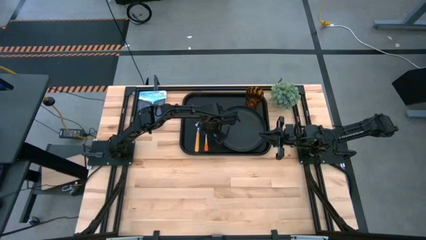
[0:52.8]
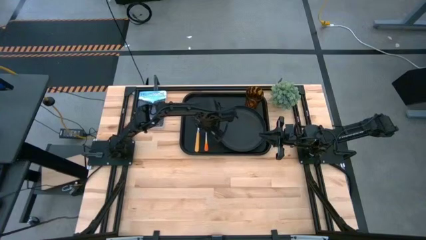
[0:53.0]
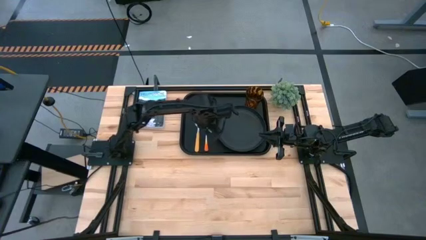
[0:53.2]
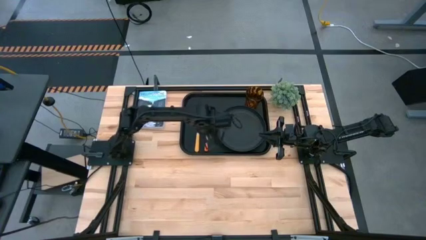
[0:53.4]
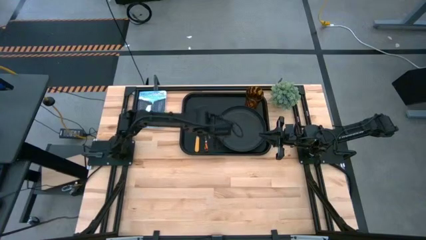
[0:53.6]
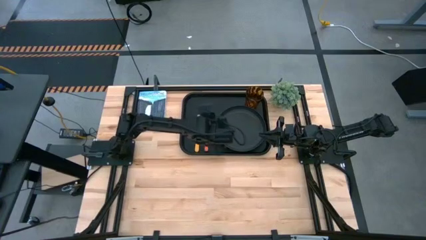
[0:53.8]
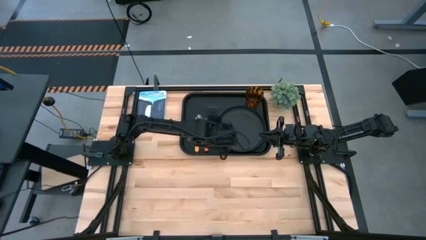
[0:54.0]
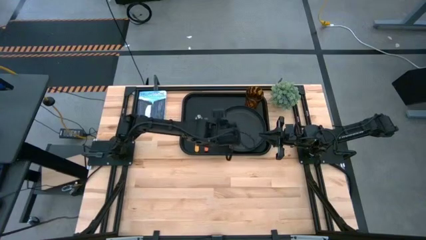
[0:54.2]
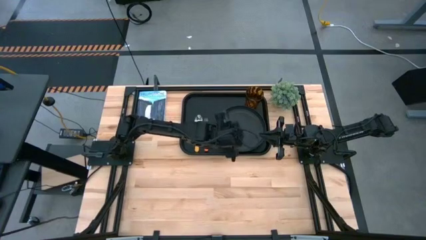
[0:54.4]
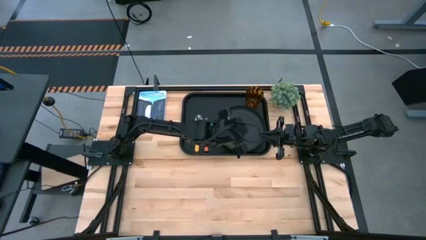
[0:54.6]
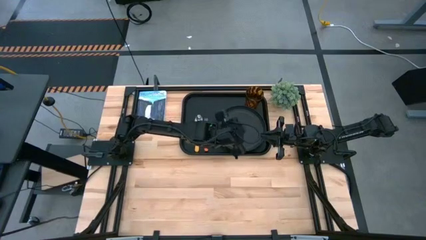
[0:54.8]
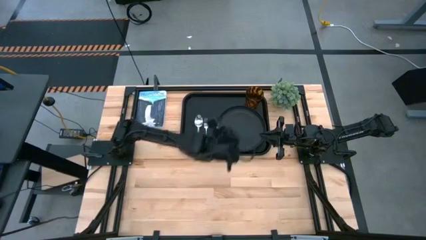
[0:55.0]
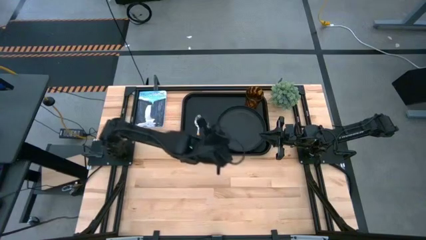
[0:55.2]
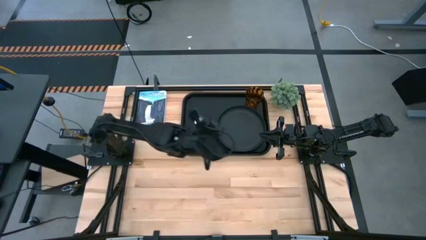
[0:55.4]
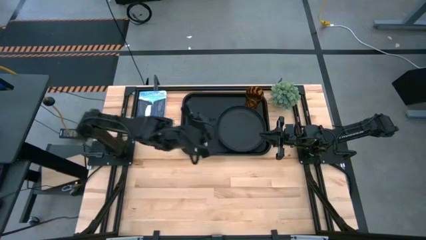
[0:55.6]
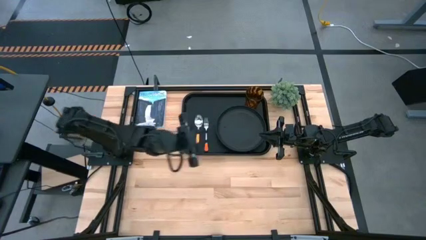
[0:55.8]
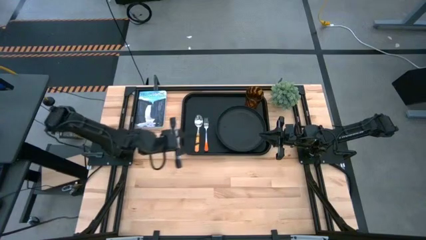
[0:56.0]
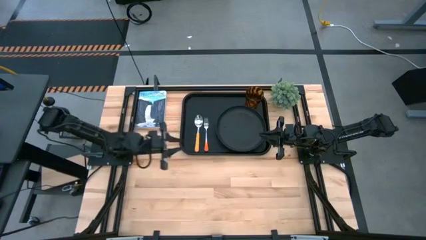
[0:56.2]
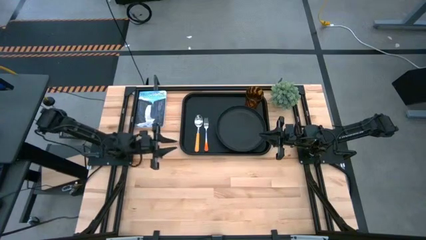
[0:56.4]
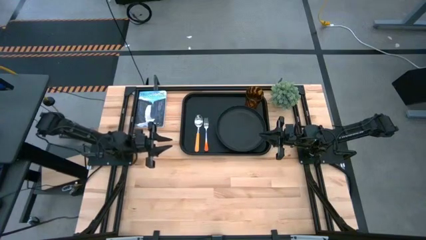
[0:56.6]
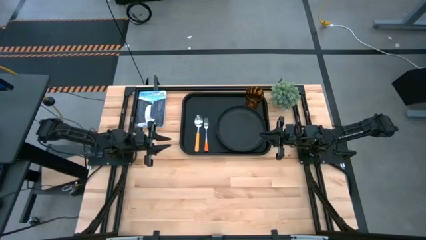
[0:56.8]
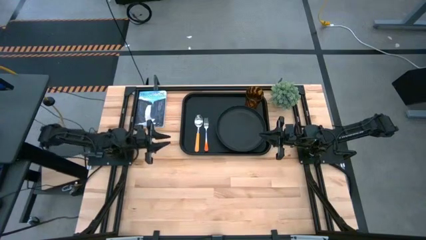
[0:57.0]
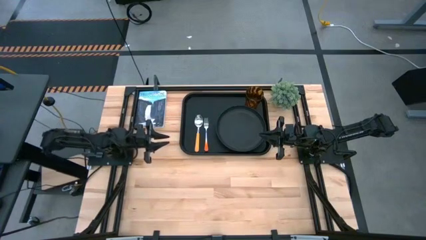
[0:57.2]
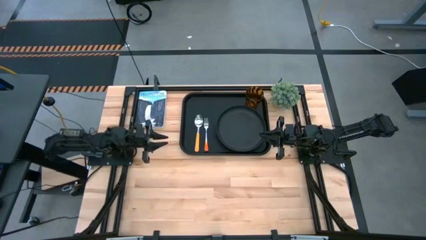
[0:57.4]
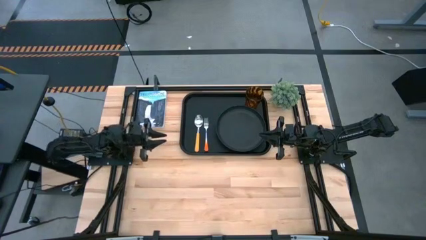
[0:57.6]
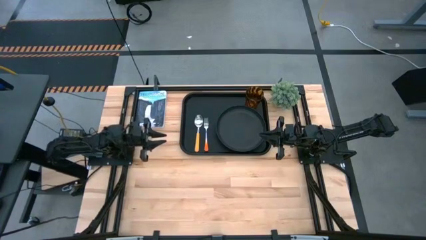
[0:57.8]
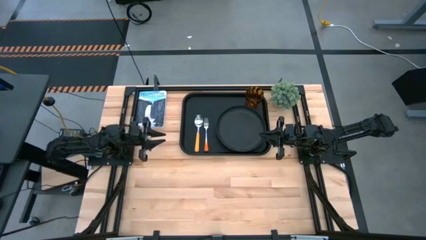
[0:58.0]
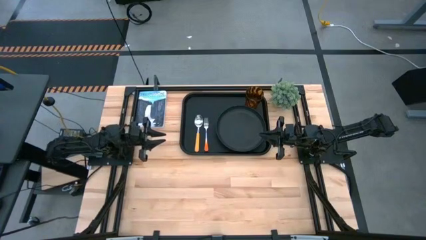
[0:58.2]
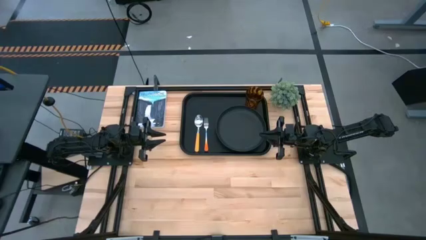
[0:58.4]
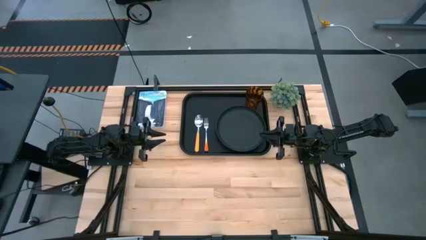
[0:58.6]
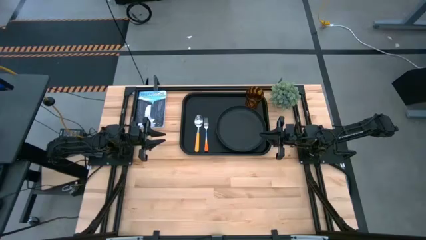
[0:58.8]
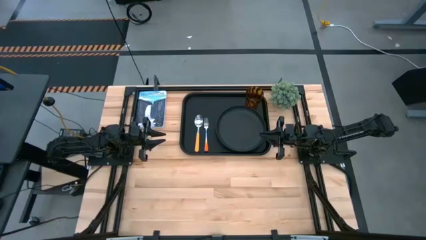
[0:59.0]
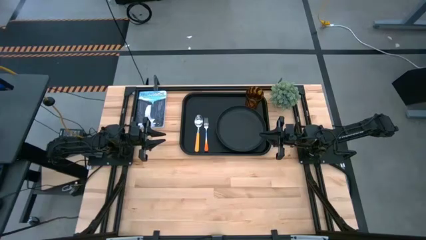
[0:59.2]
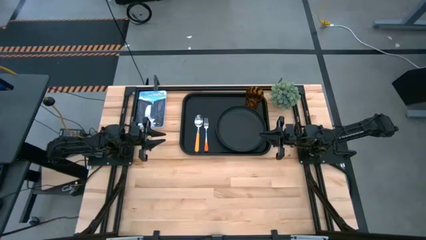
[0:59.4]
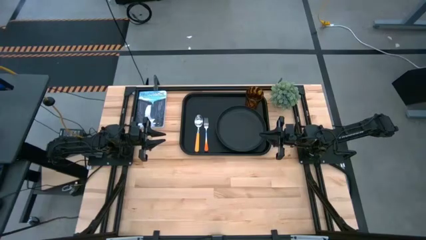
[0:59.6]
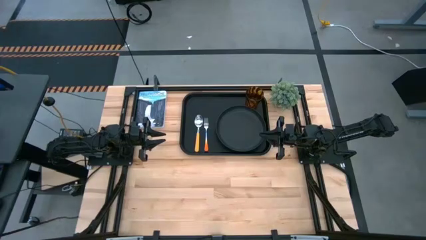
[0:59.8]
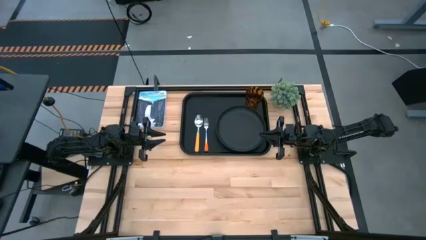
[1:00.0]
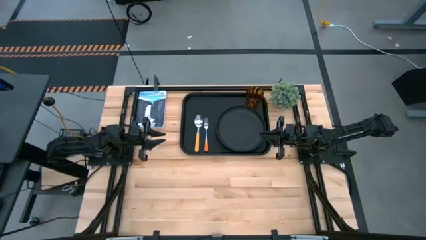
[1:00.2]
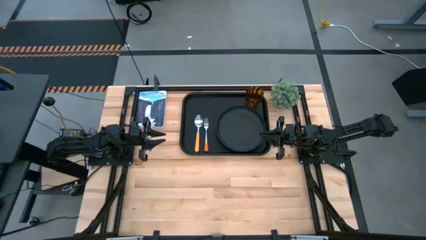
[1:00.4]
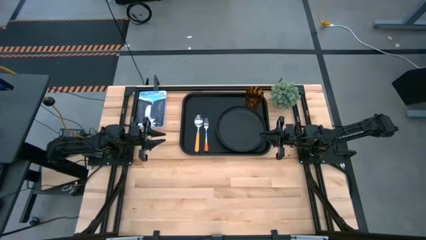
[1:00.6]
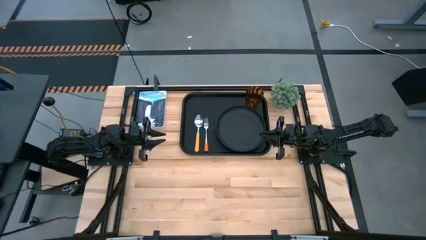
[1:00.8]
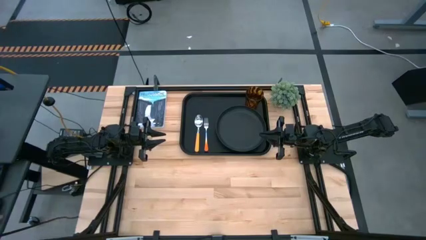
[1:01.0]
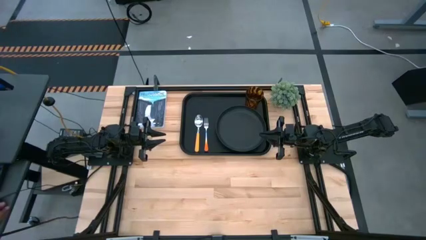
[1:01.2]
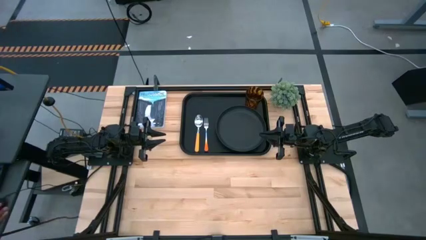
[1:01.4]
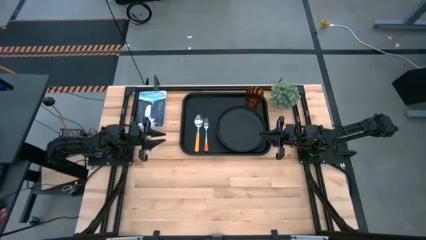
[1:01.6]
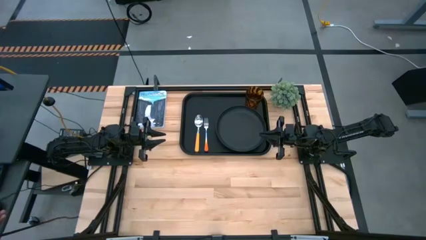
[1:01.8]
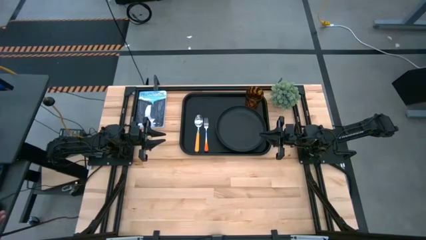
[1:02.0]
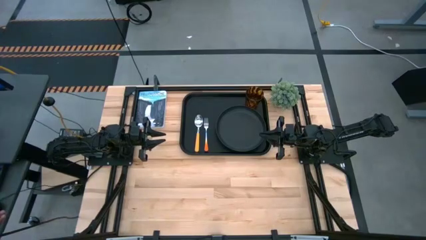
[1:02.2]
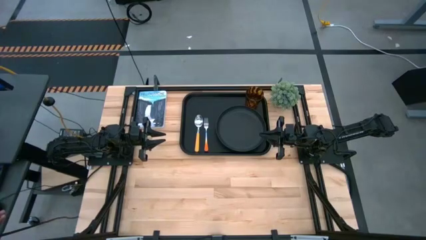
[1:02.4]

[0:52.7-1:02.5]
Task: Pick and place plate/cup/fork/spoon on tray
Return to Home Position
